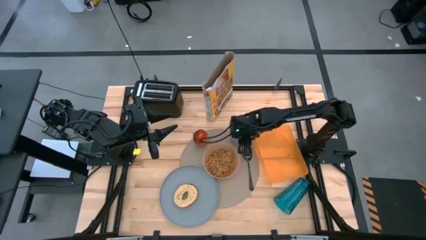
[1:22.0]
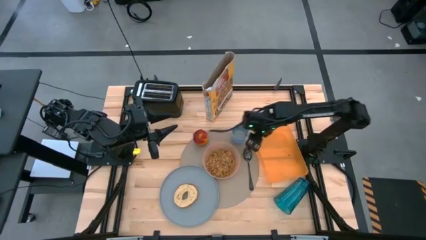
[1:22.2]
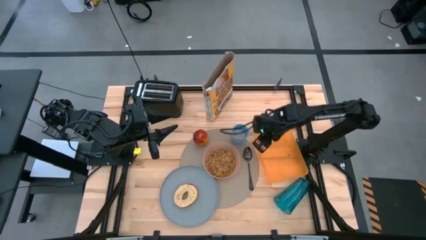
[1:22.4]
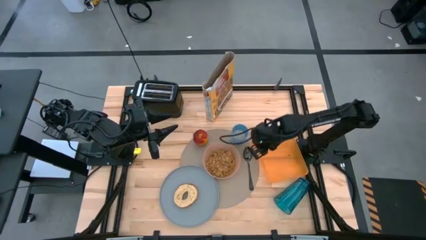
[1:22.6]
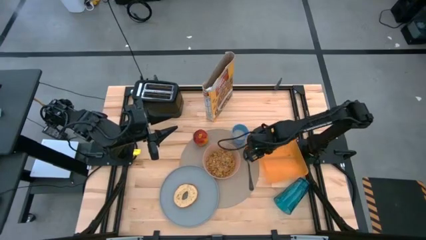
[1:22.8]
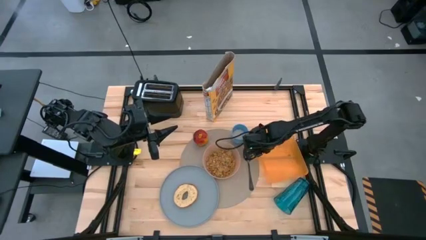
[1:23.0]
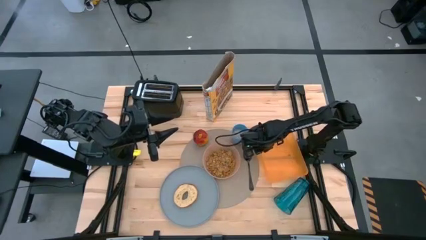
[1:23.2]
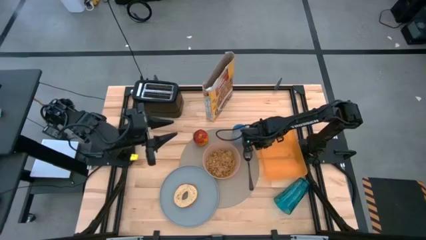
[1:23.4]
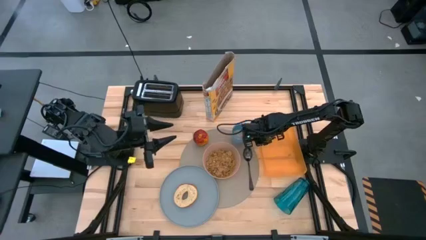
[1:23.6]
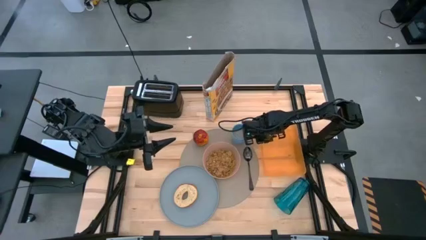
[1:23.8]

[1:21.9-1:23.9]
Task: Arrange a breakfast setting
Adjust the orange bin

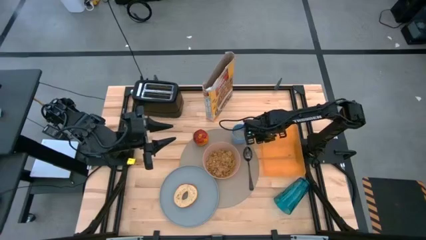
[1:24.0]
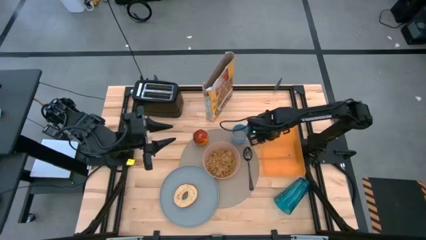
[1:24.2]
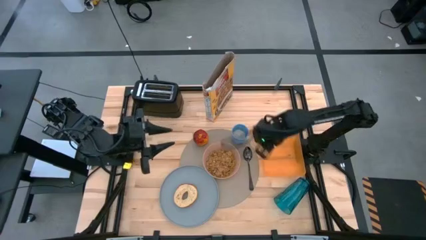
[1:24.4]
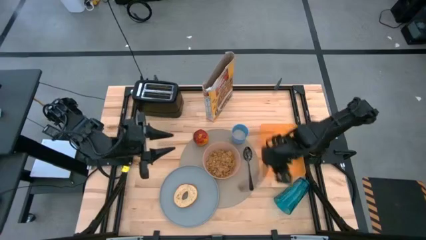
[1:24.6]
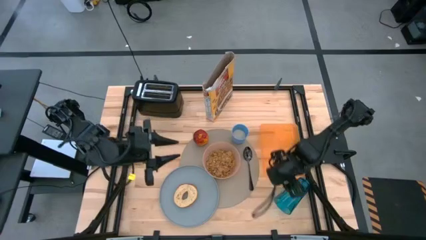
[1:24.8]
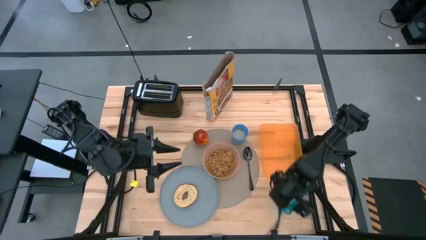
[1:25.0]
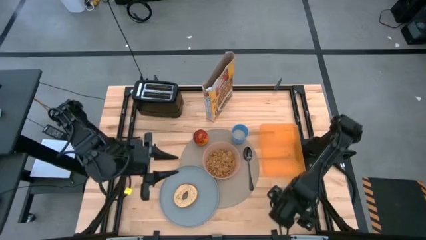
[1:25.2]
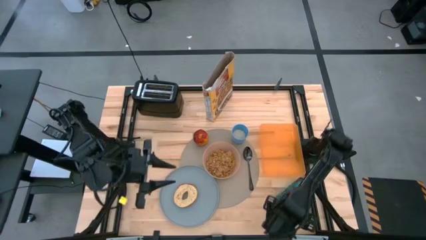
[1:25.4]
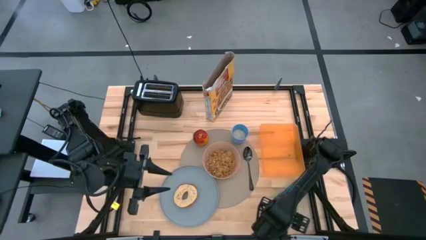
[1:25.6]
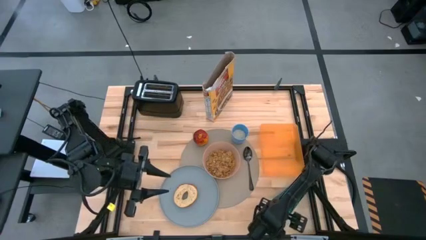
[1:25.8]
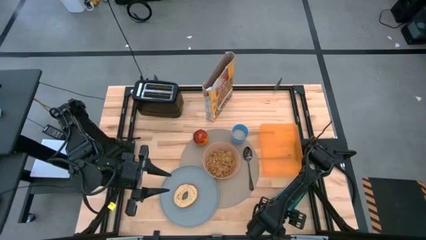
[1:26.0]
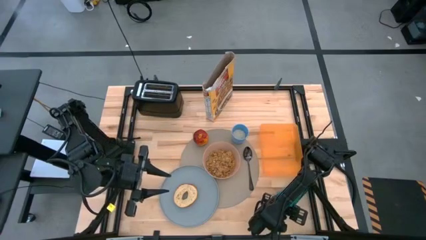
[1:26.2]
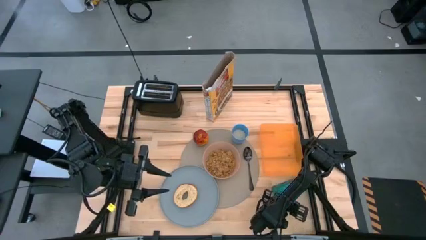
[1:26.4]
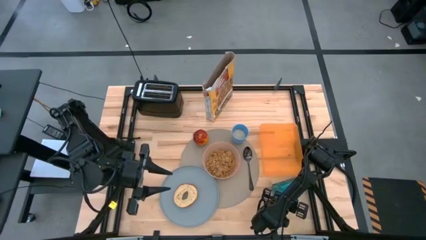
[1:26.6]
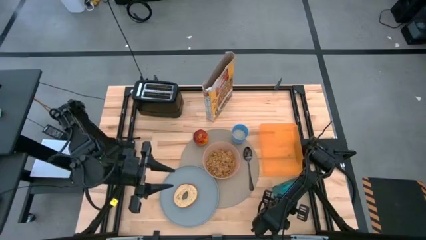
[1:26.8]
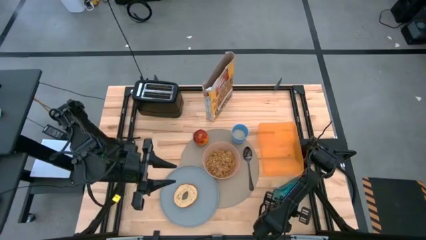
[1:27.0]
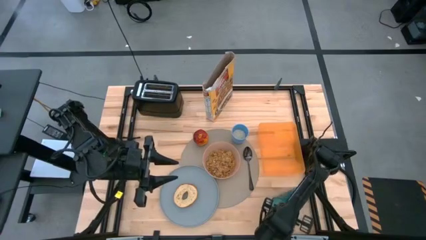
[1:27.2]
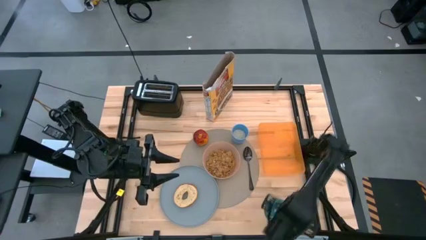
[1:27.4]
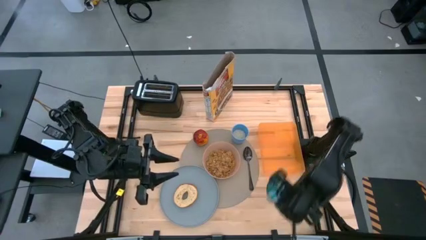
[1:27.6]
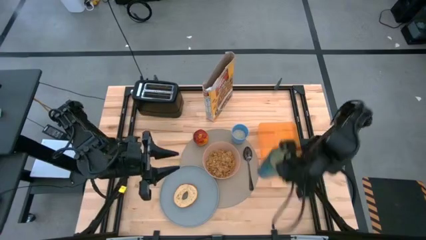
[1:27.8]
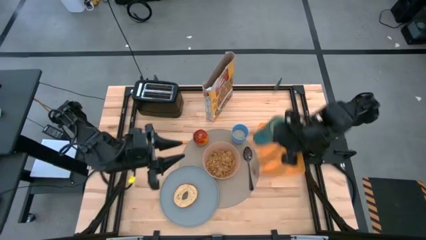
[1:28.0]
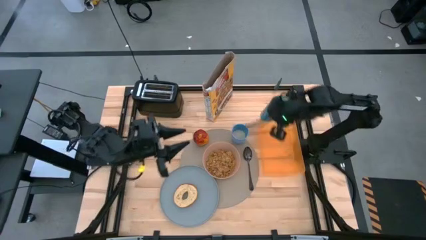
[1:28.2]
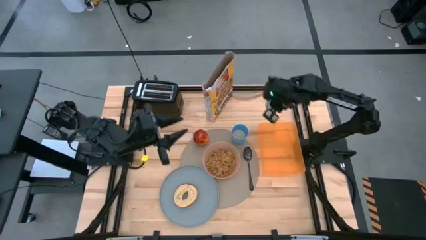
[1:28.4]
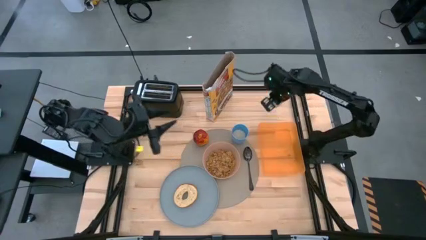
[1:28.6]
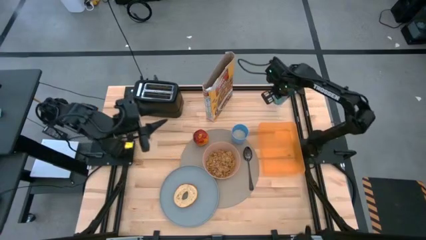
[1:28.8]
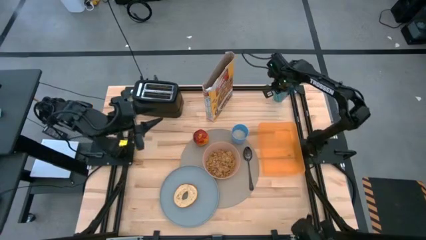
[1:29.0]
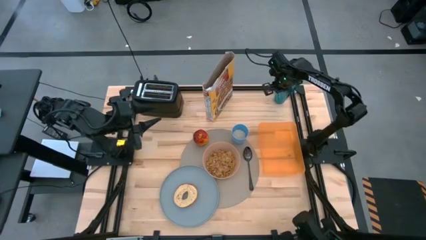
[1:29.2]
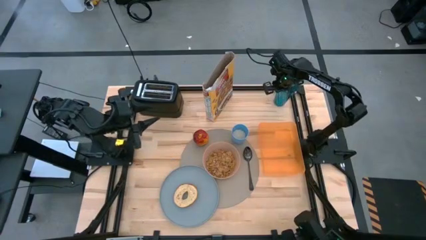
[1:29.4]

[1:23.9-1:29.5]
Move the light blue cup to the top right of the table

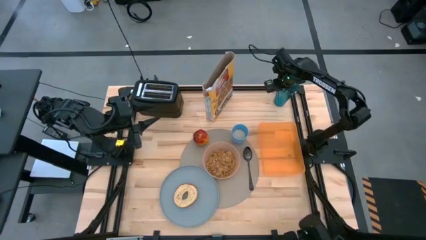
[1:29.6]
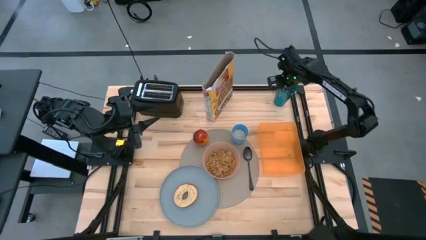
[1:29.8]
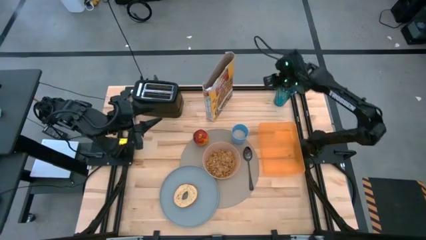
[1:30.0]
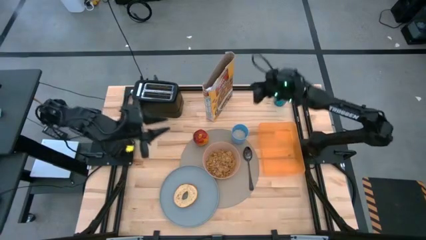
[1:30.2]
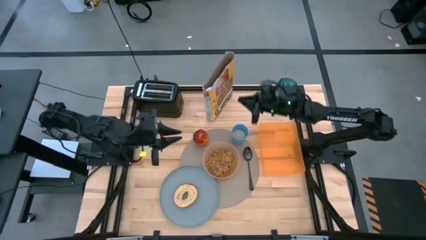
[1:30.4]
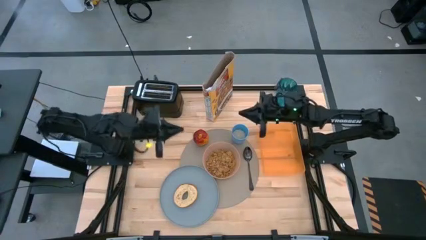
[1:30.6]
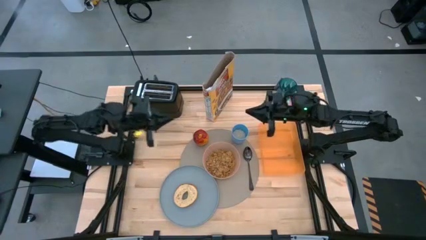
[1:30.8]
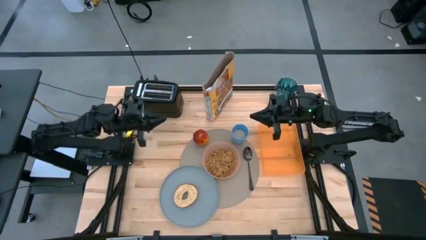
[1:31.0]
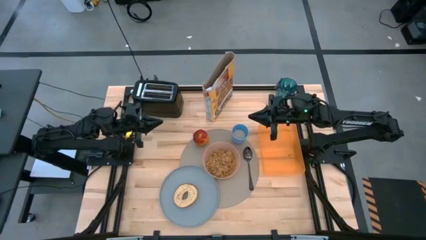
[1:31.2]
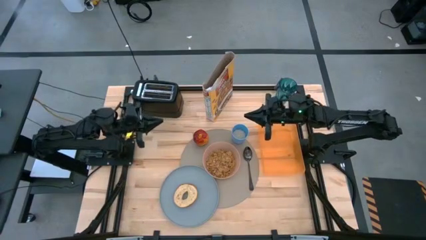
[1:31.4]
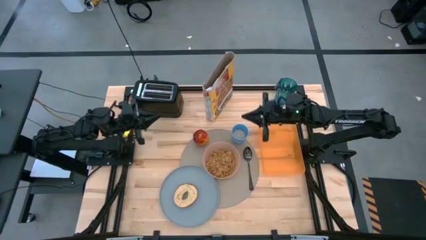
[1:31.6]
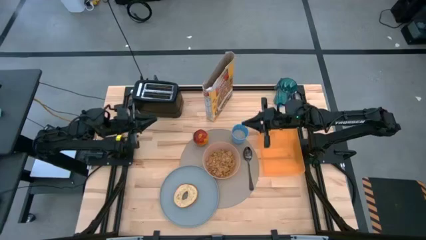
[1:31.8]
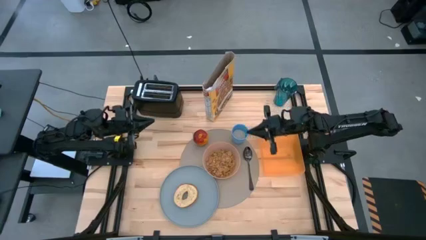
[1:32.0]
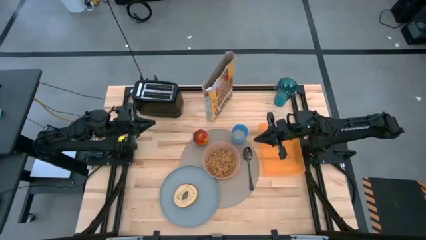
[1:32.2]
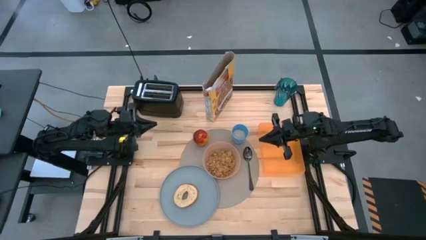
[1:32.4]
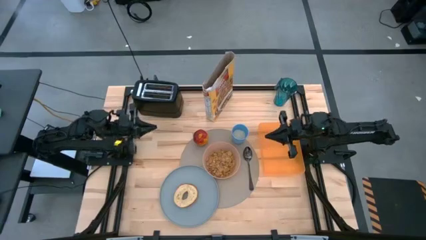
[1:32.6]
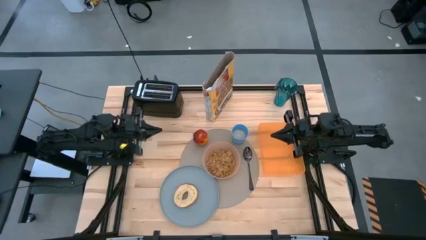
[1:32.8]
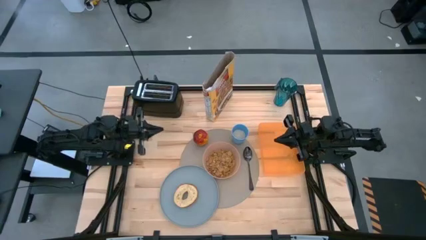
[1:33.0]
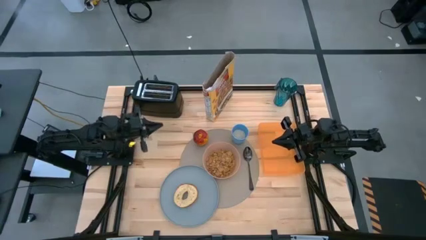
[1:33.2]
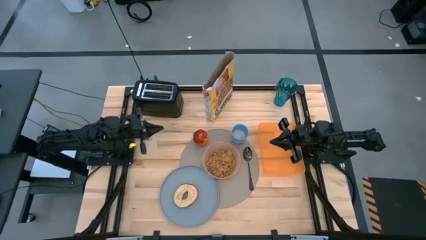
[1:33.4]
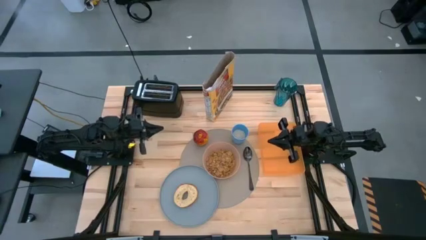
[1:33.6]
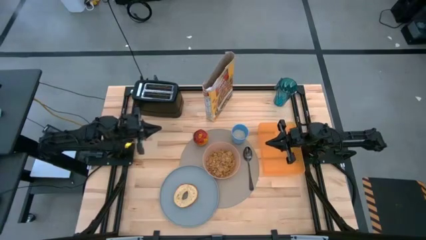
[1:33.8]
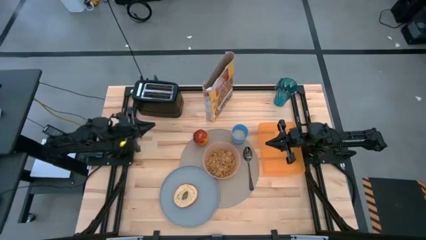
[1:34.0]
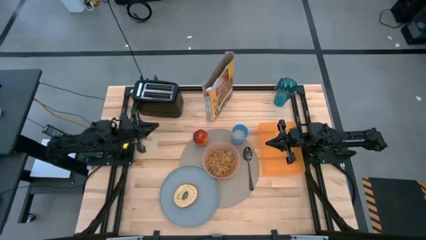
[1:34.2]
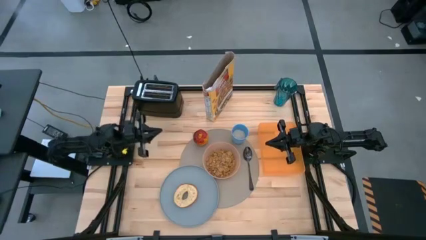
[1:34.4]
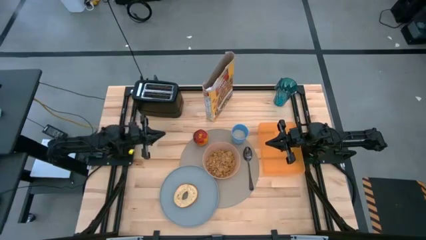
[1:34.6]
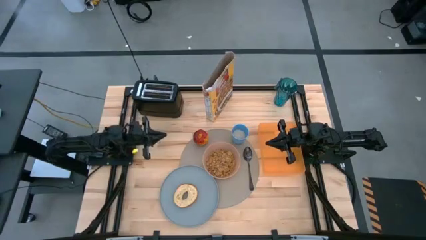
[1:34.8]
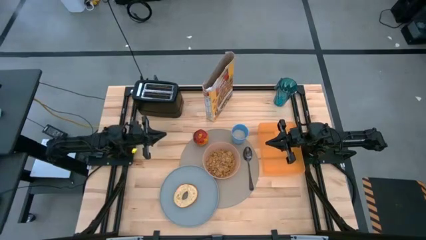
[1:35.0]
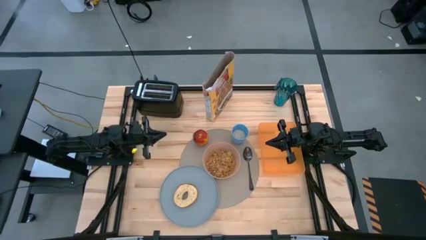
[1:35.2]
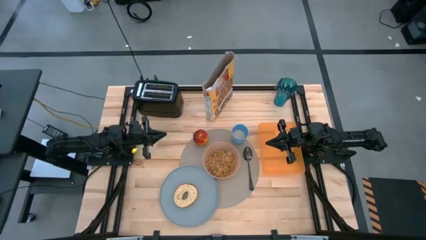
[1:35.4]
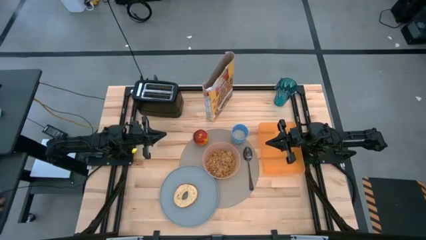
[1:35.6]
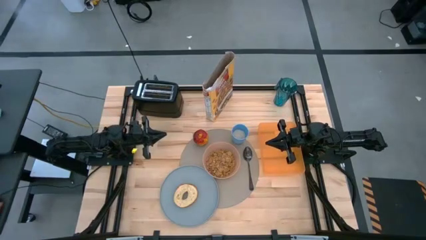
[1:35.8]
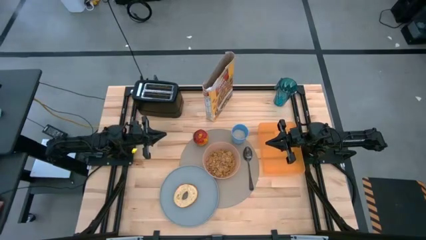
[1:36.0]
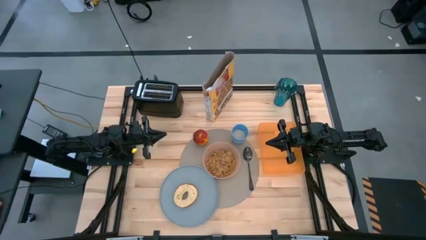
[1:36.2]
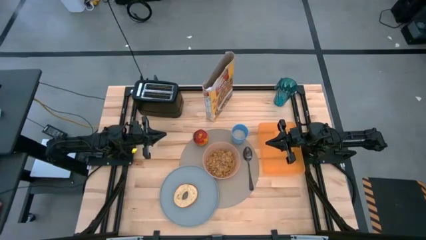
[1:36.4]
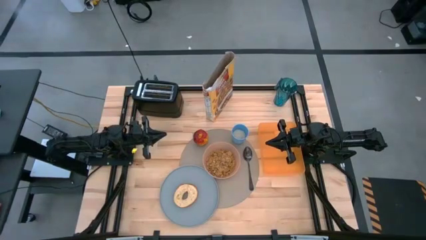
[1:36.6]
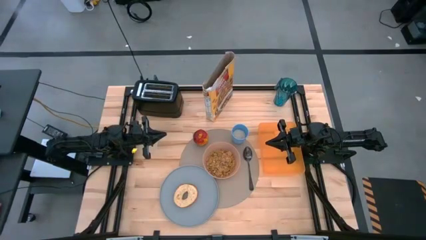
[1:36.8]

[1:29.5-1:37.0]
Return to Home Position
